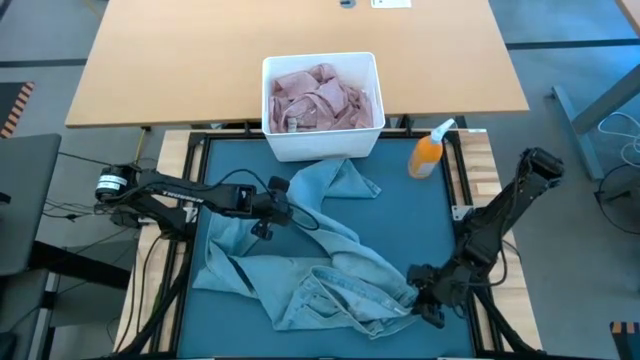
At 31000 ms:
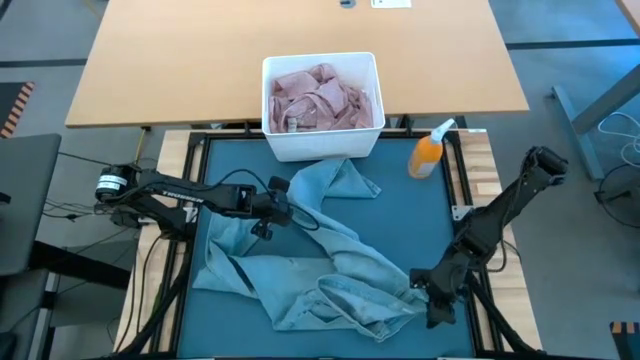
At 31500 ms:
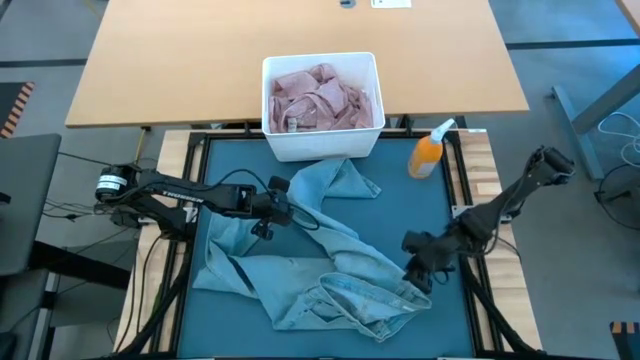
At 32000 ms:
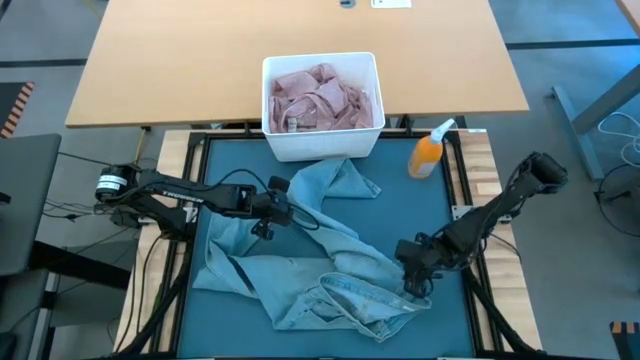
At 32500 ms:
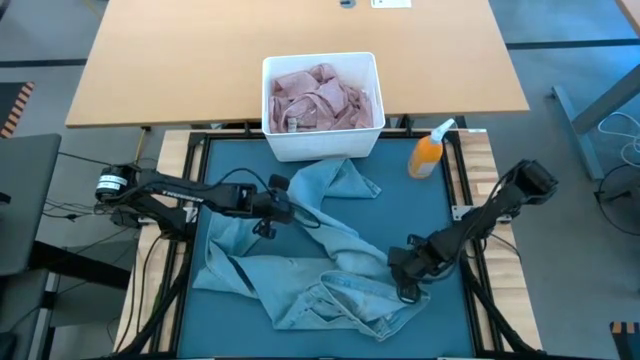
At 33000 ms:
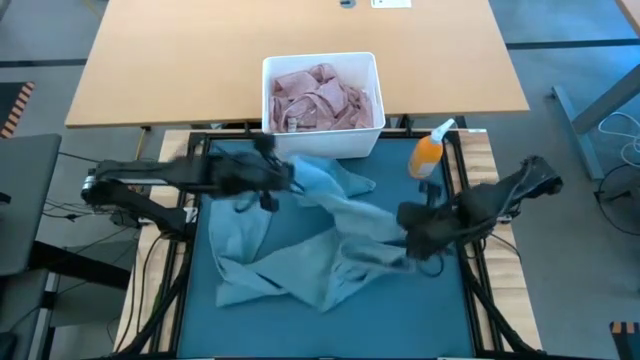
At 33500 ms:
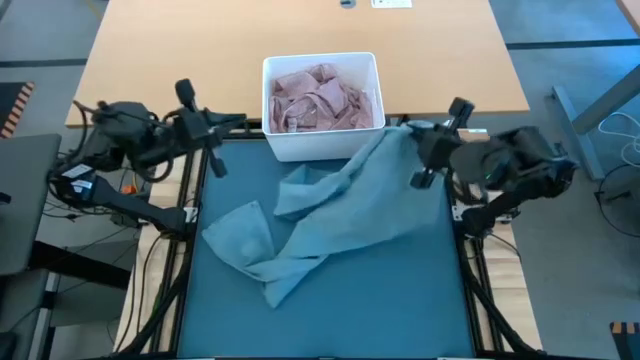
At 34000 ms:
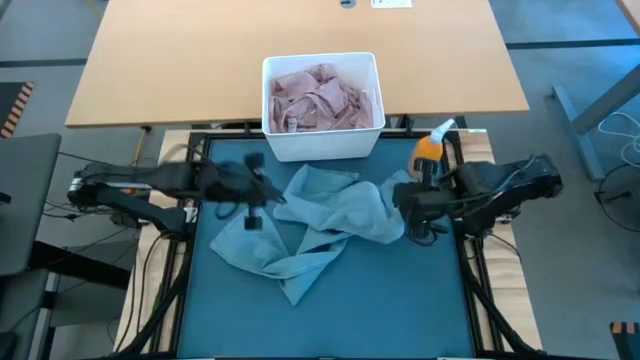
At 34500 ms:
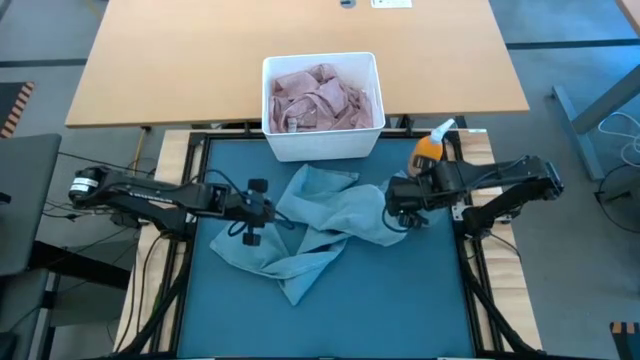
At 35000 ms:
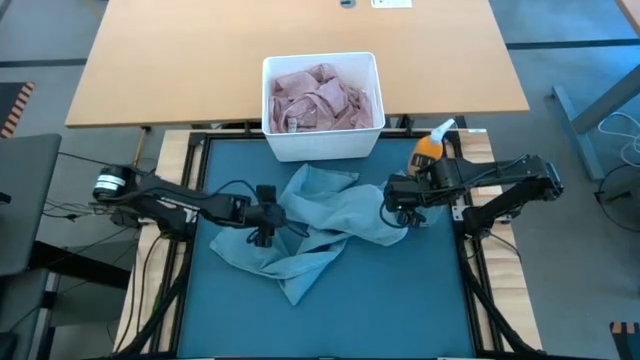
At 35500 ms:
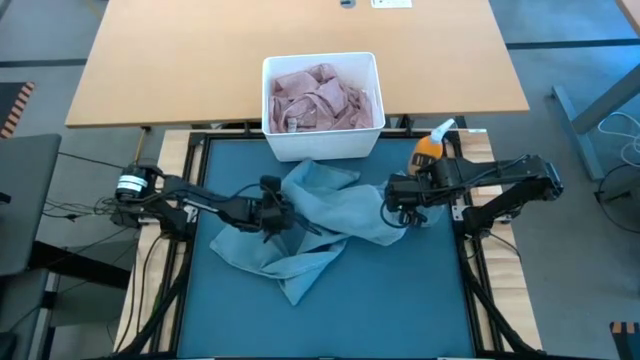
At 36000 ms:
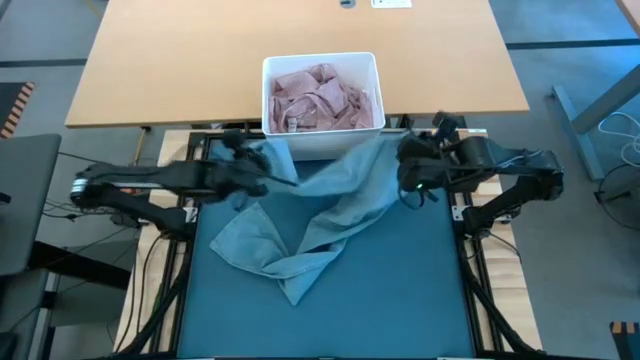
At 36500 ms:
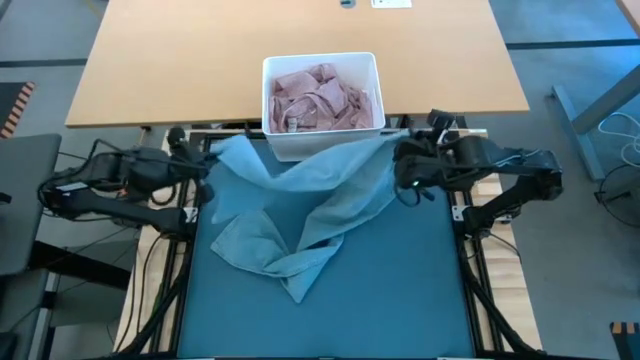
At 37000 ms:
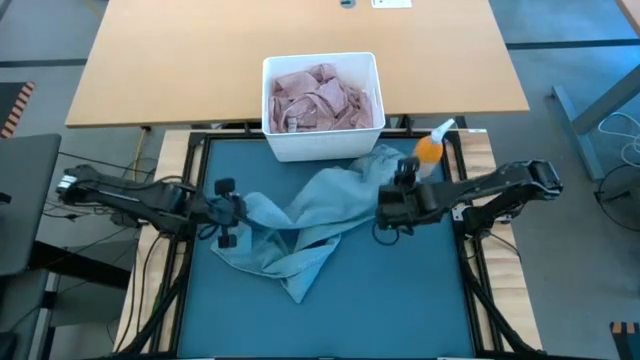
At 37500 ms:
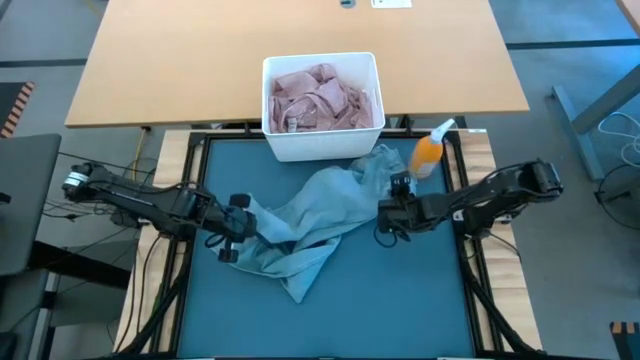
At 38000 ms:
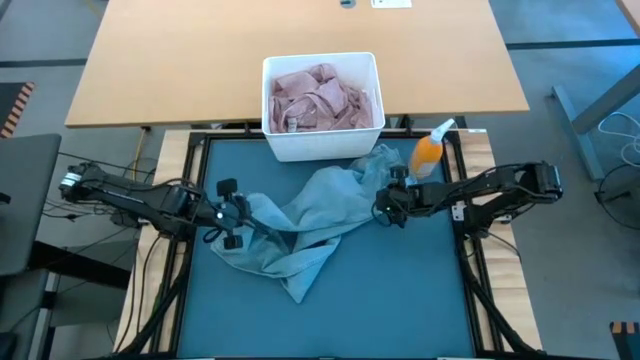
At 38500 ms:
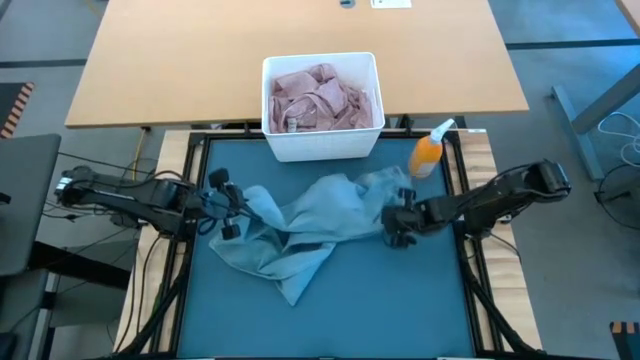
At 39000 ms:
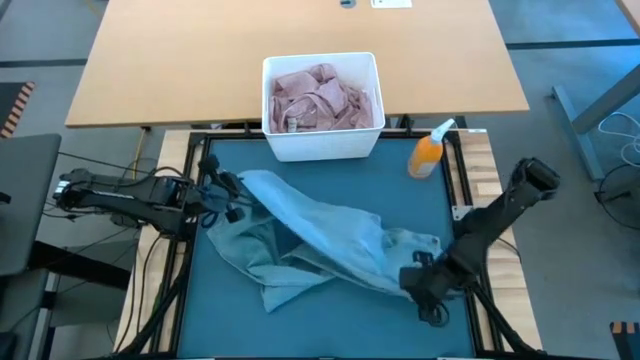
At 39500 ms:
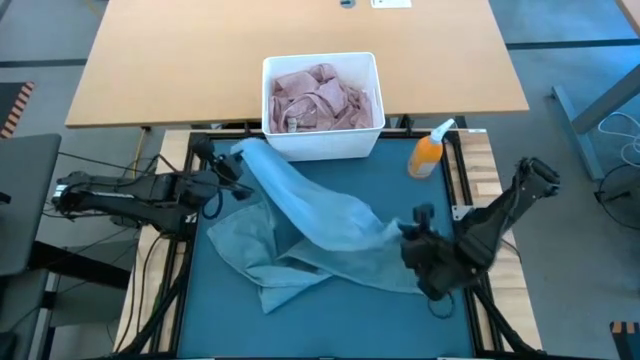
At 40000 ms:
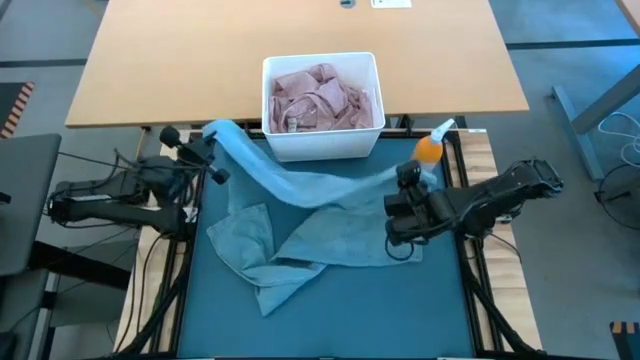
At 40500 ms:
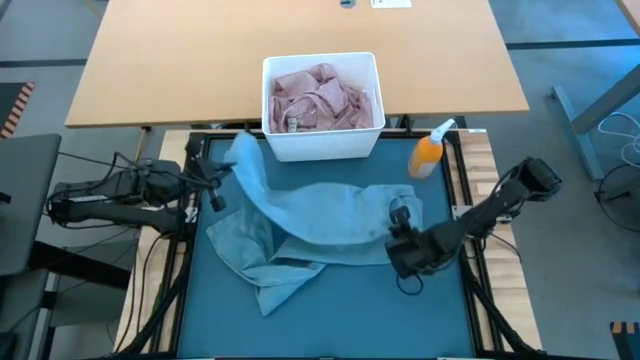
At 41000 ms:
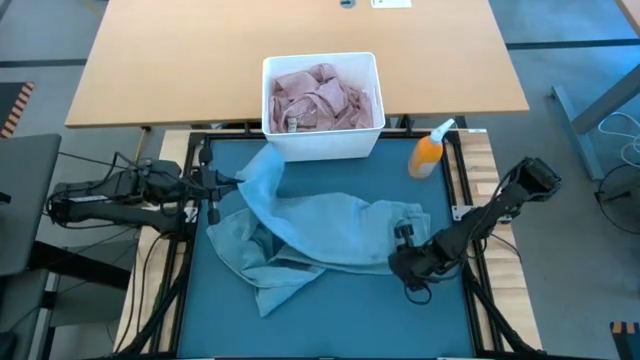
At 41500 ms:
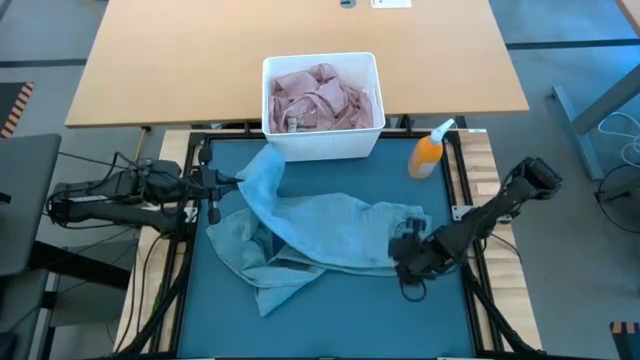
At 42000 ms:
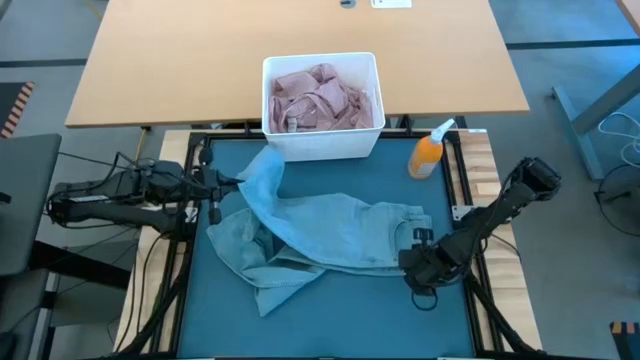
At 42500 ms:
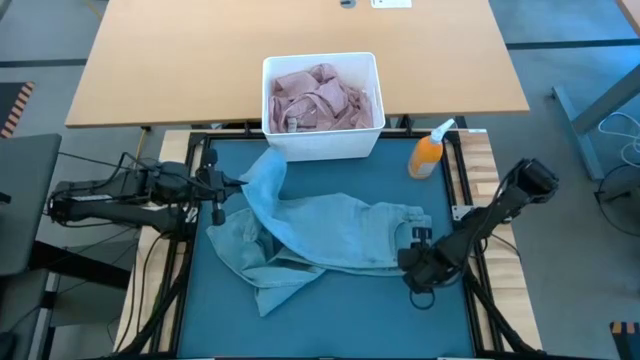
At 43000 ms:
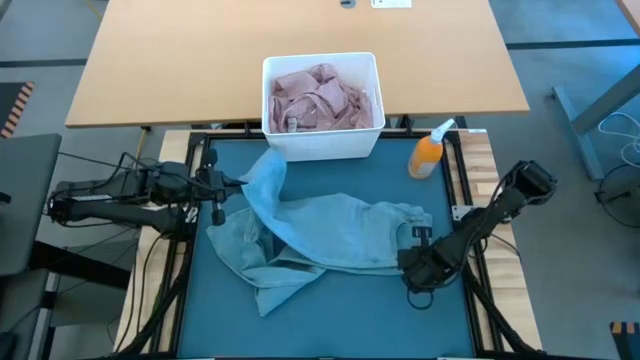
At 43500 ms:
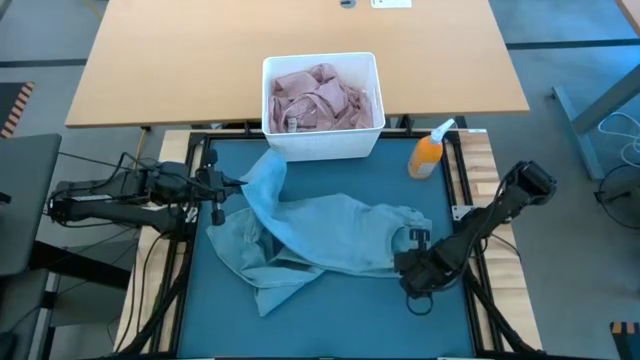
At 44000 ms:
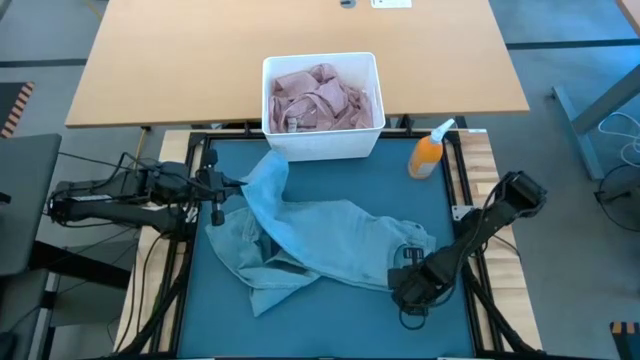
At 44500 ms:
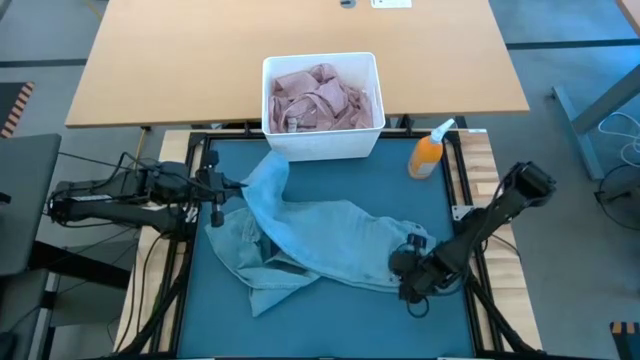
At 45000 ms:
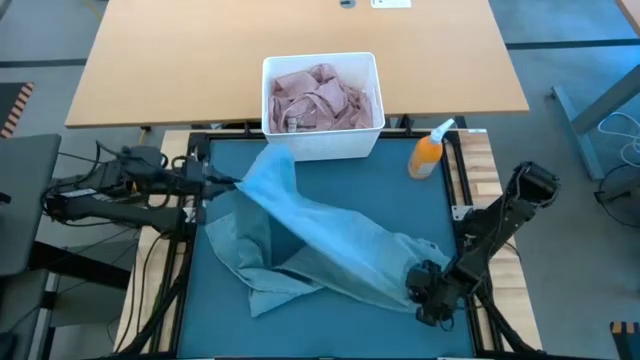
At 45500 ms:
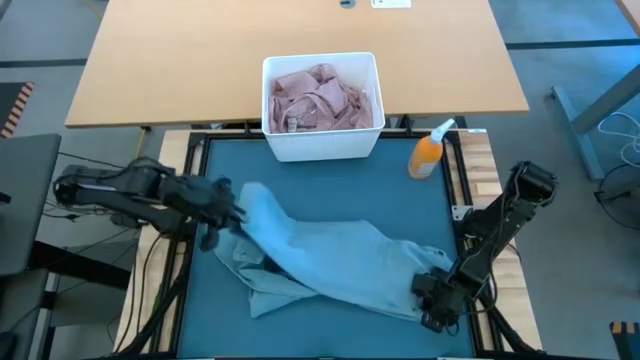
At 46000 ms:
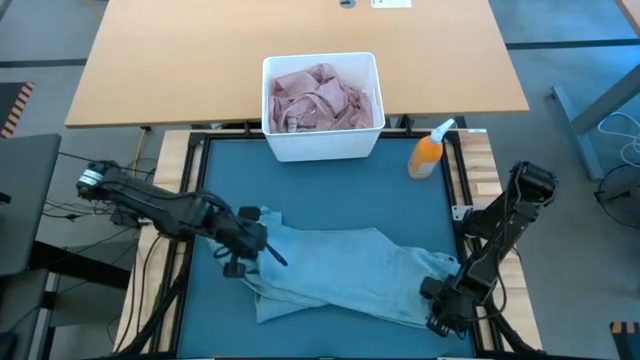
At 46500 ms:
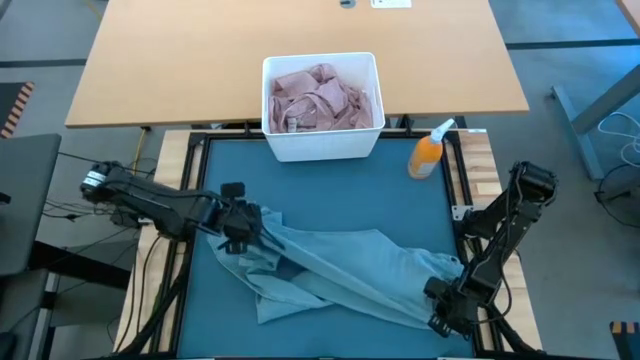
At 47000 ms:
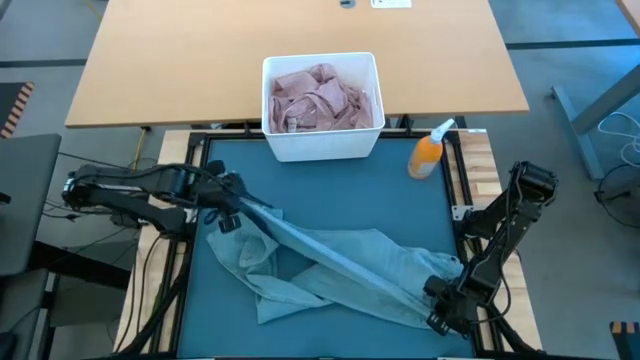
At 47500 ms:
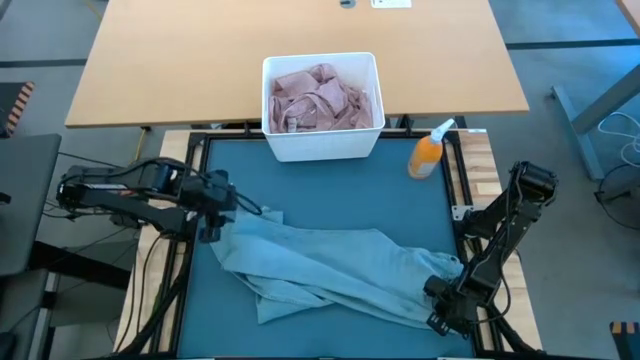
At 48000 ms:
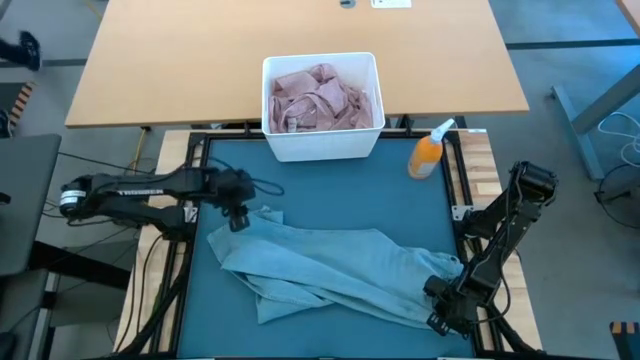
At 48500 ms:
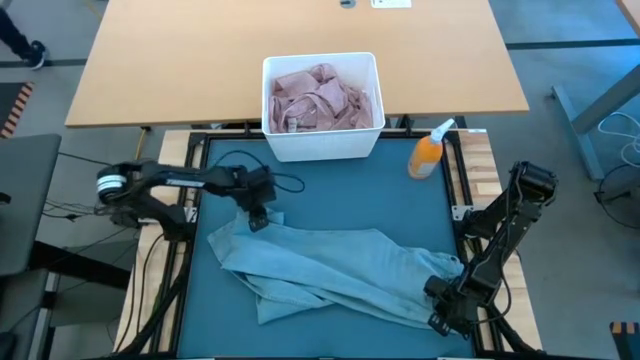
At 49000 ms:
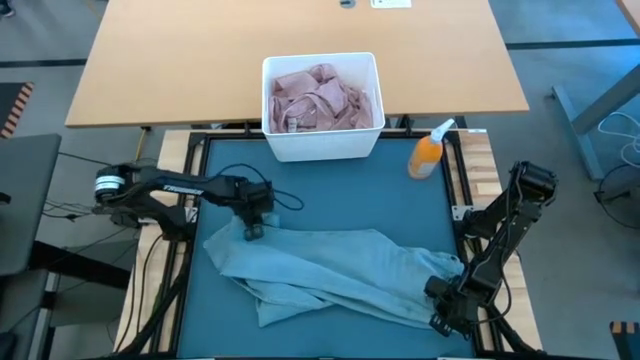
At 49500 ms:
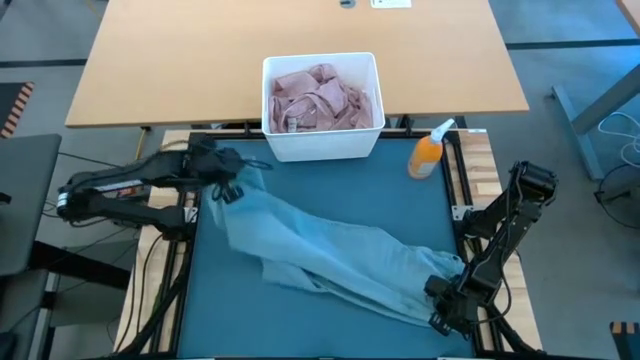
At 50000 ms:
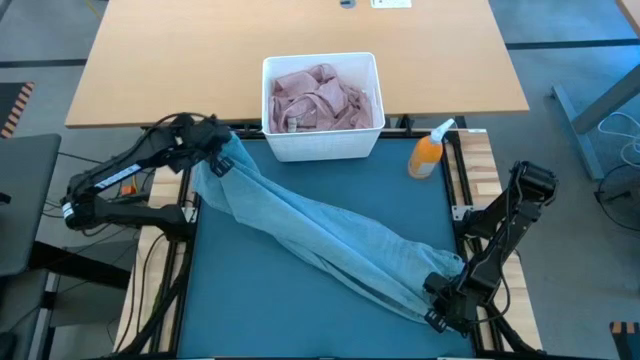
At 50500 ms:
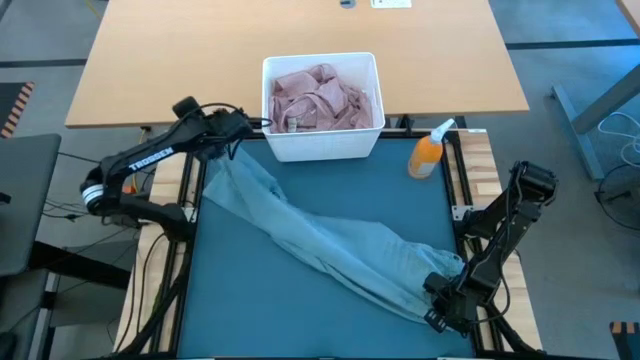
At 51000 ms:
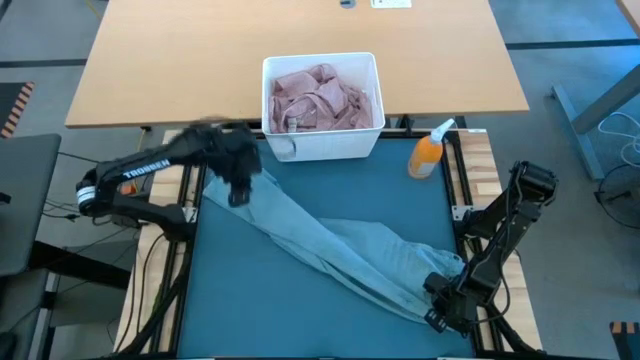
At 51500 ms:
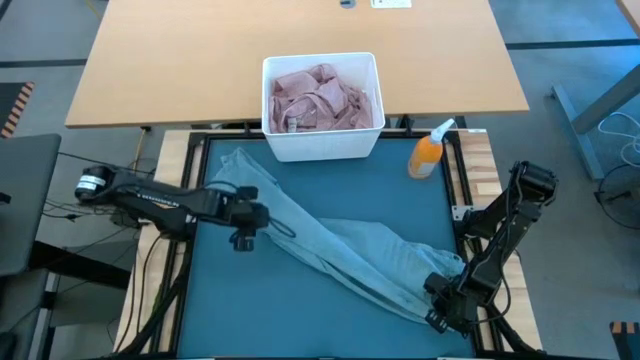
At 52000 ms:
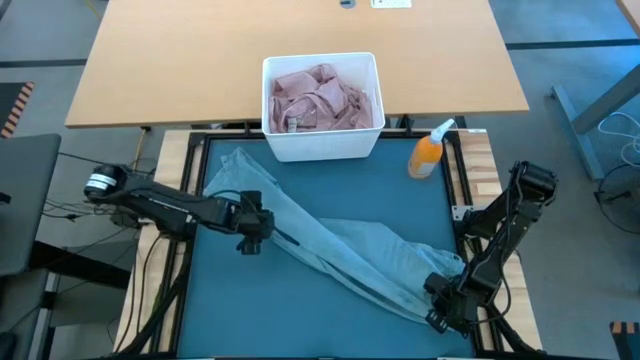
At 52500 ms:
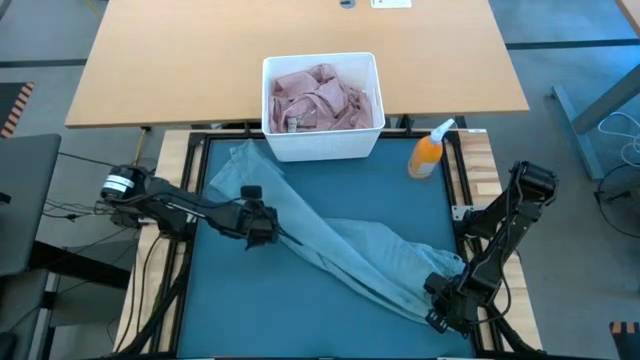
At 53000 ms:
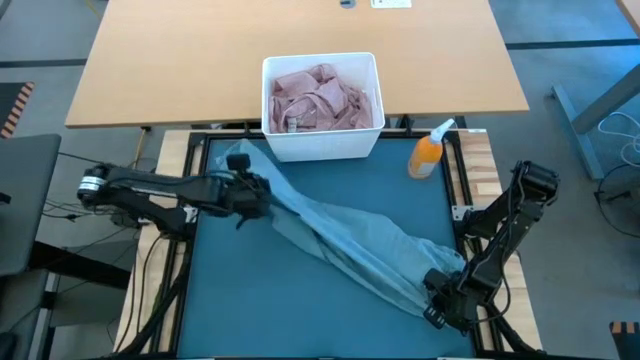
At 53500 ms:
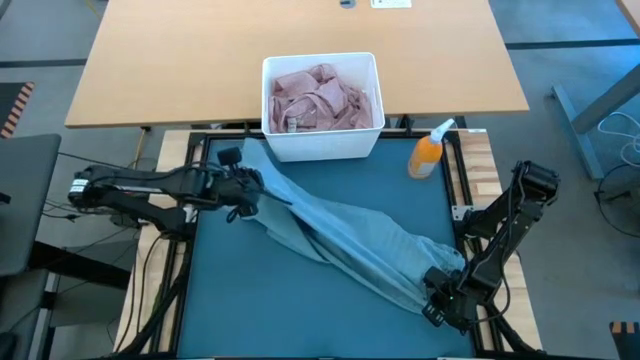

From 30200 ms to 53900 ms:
Task: Fold Laundry from Bin
Fold the blue pants
